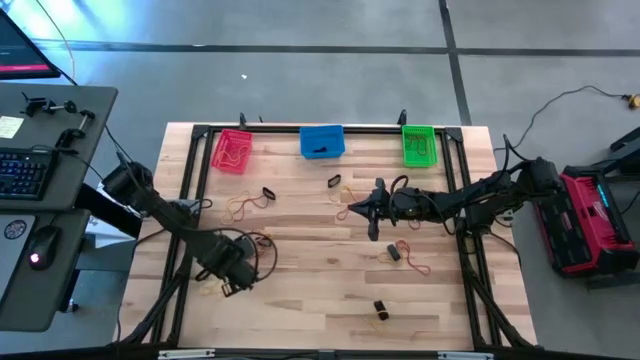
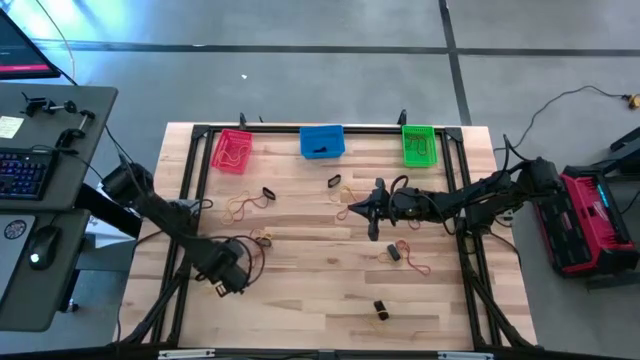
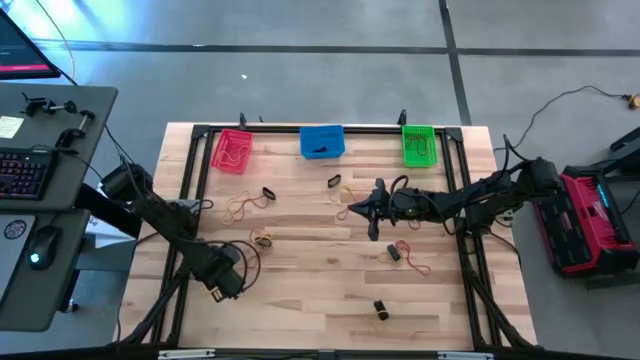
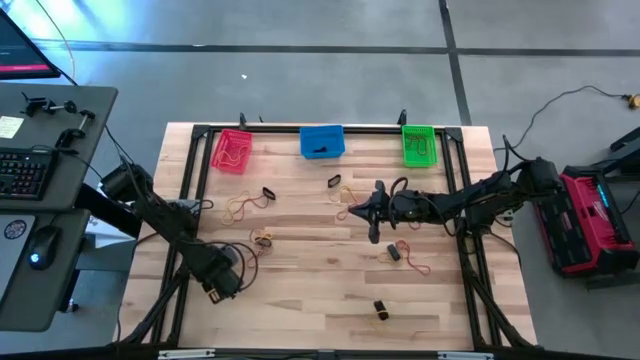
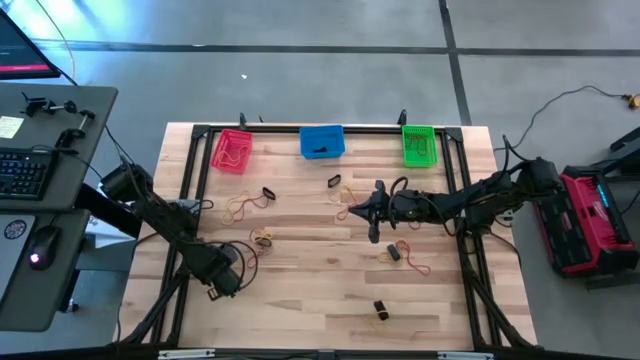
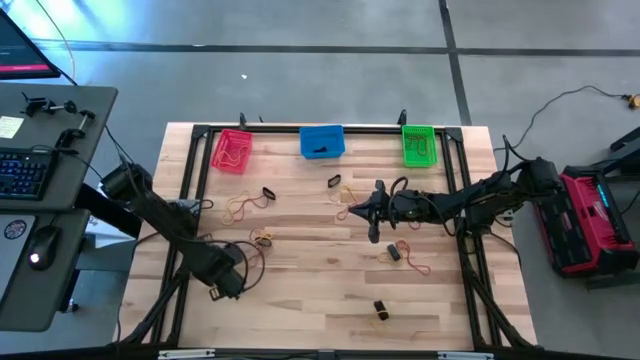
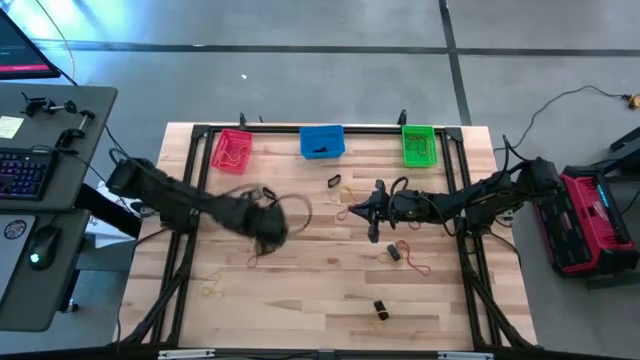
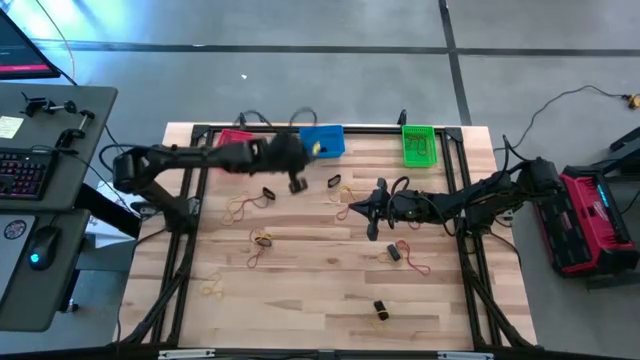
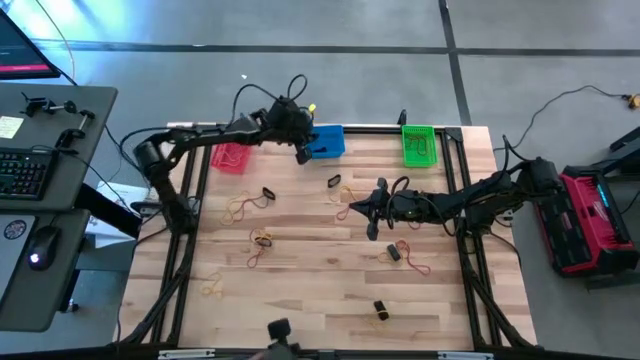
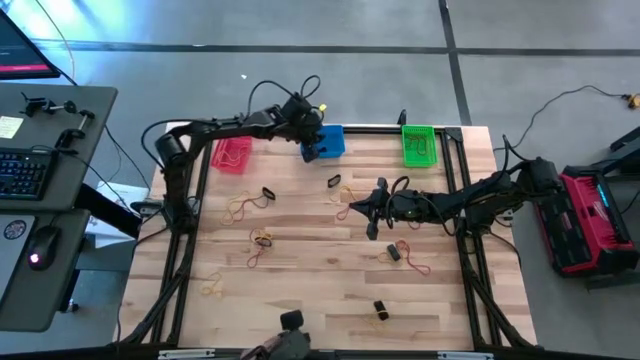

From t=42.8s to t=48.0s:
Task: Sort rubber bands into baskets
Put the black rubber band into the blue bin

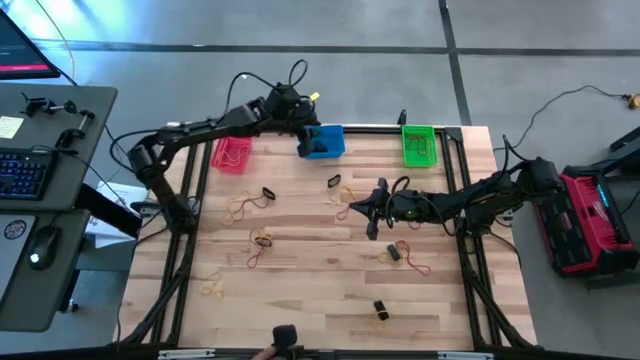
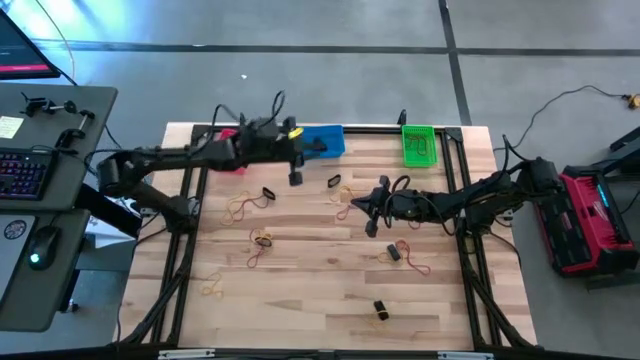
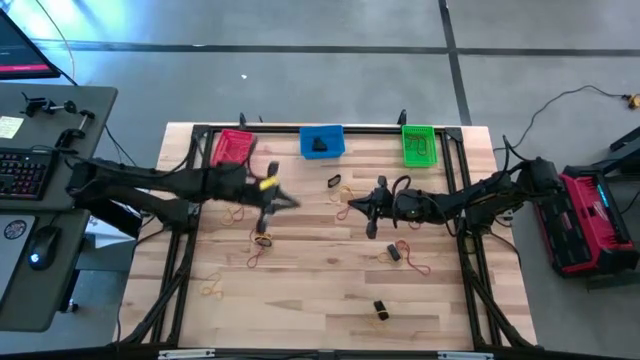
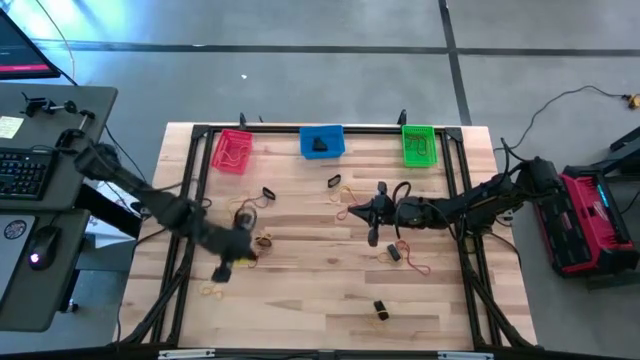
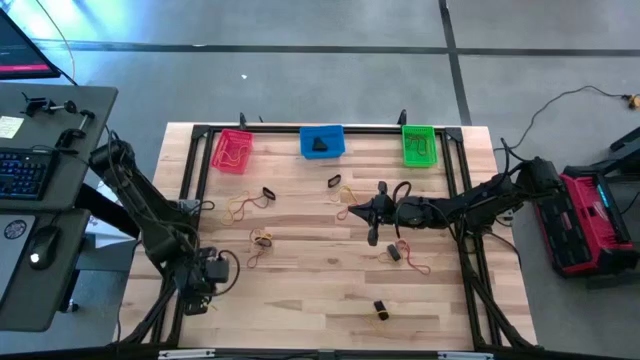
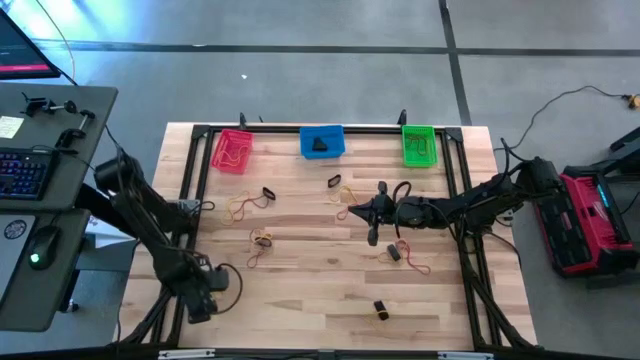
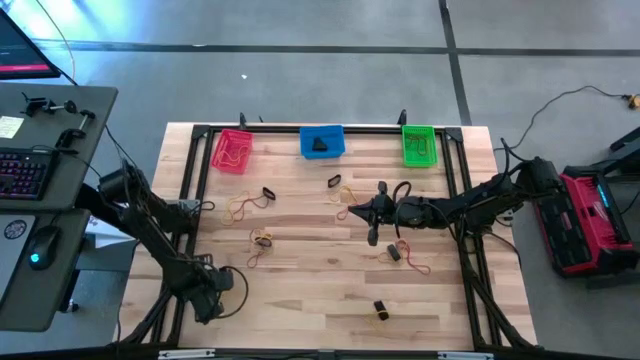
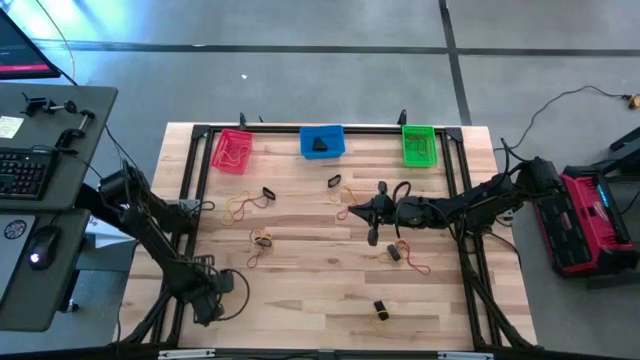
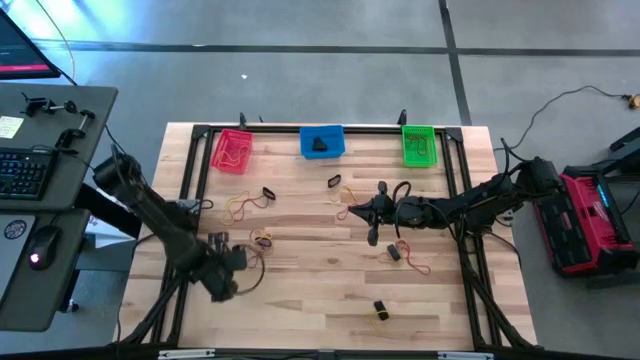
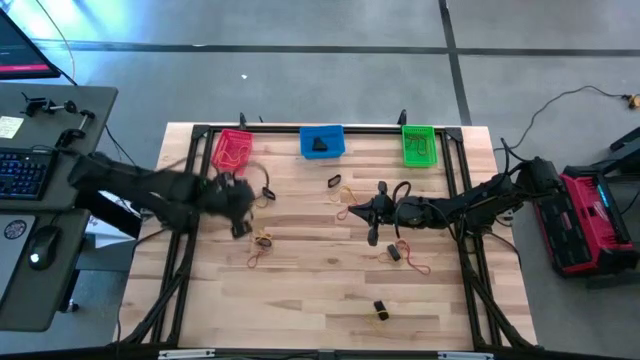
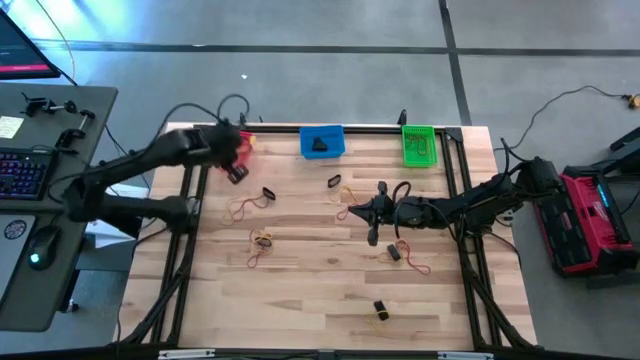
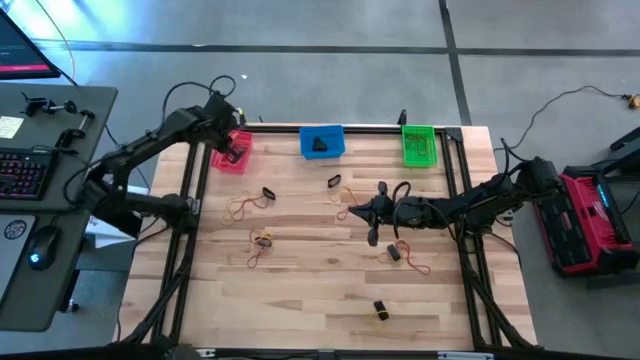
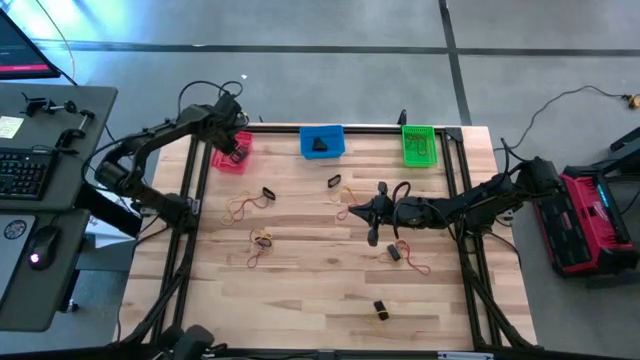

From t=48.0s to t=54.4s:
Put the yellow rubber band into the red bin

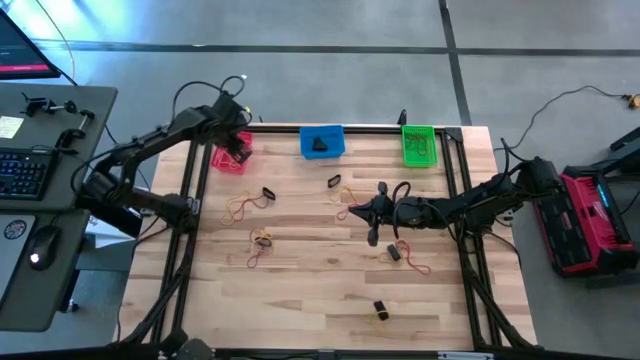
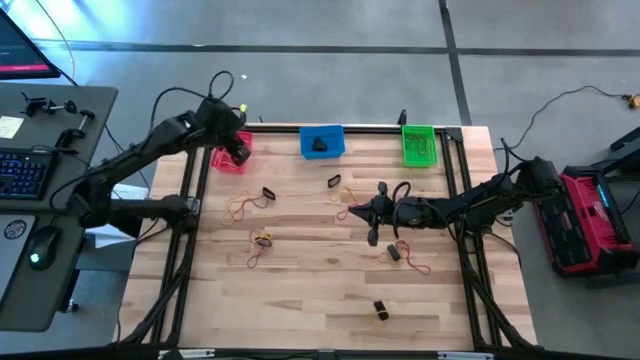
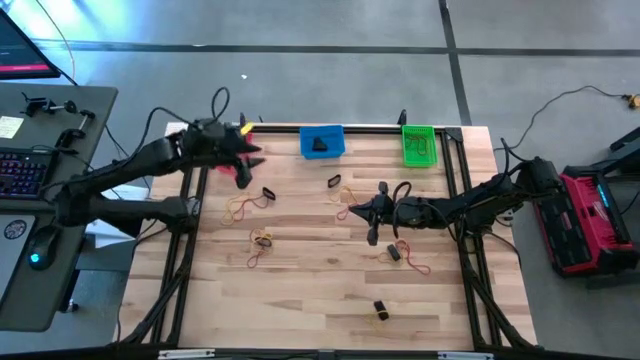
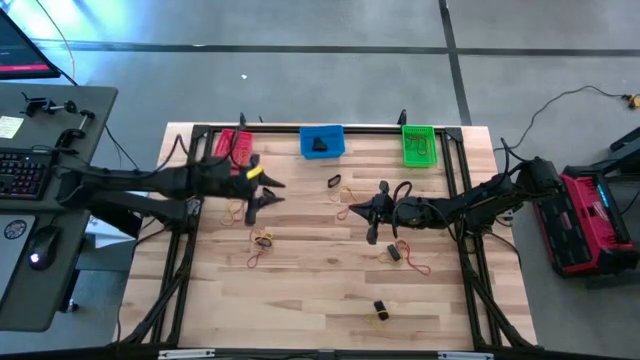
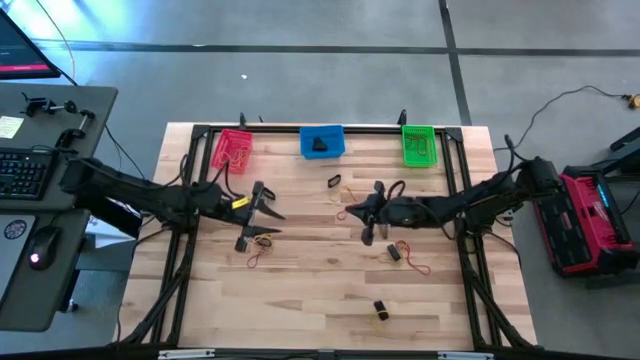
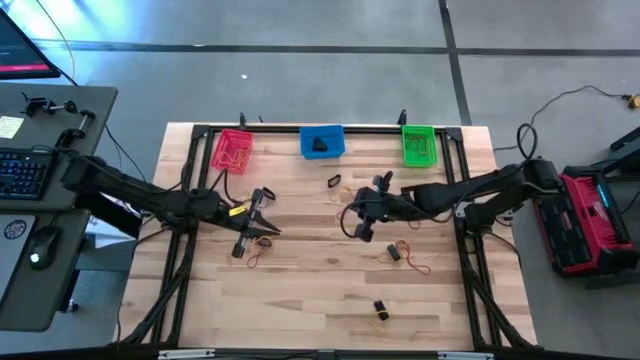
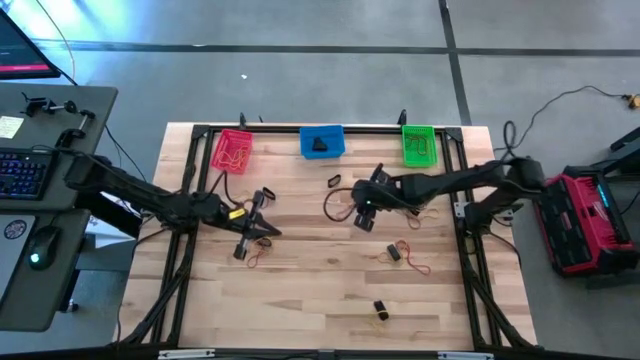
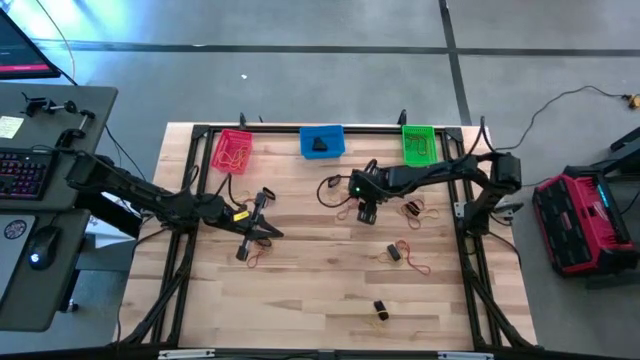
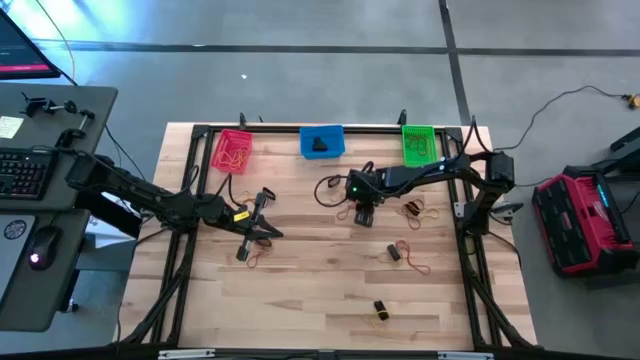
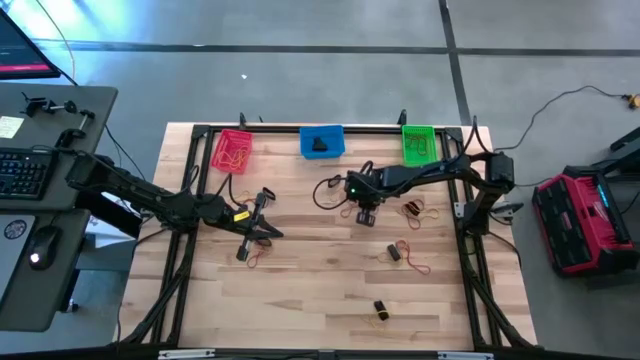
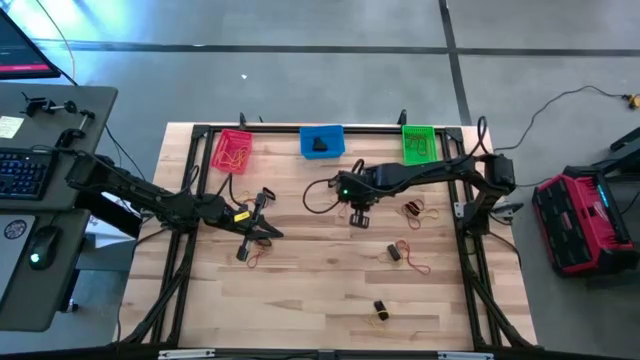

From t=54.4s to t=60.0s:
Put the red rubber band into the green bin

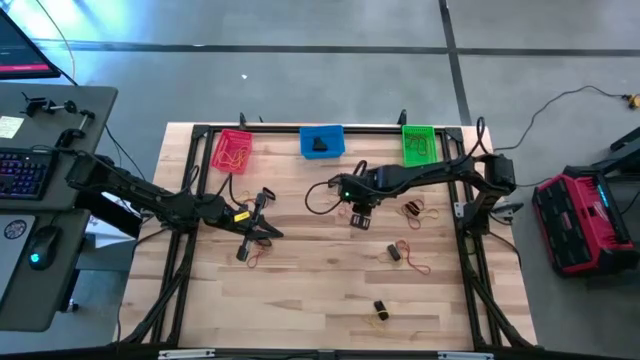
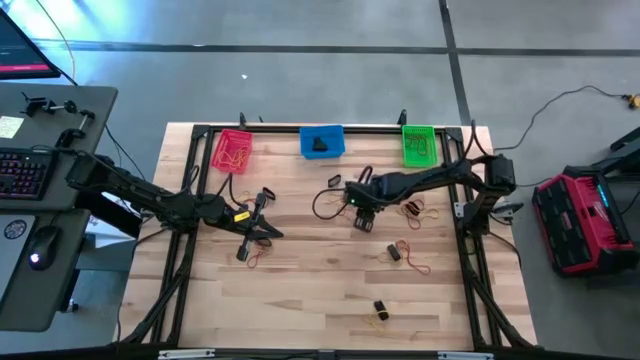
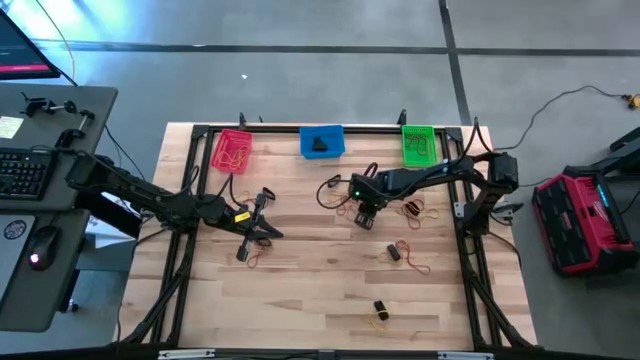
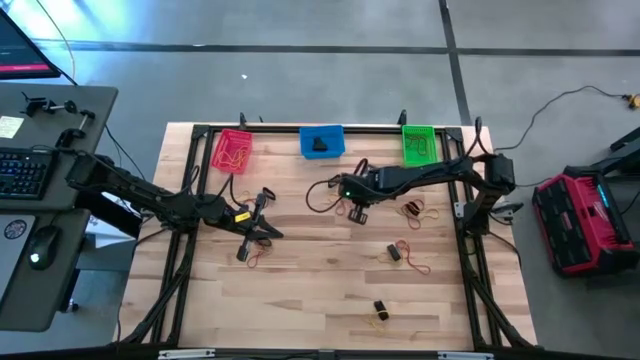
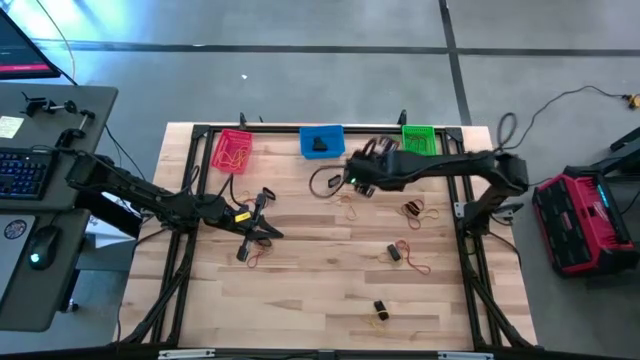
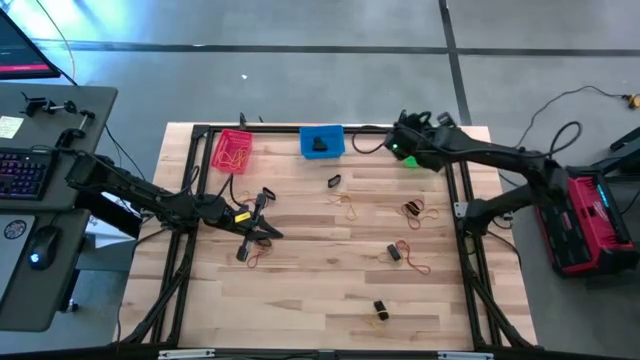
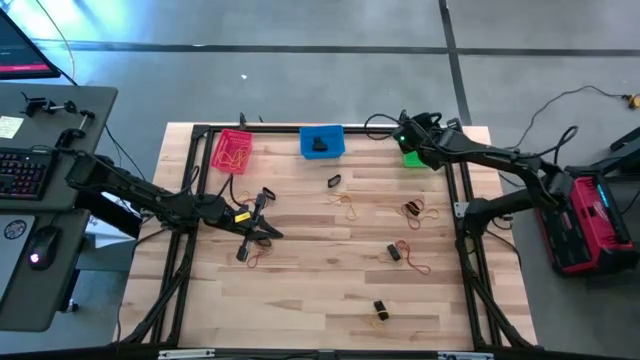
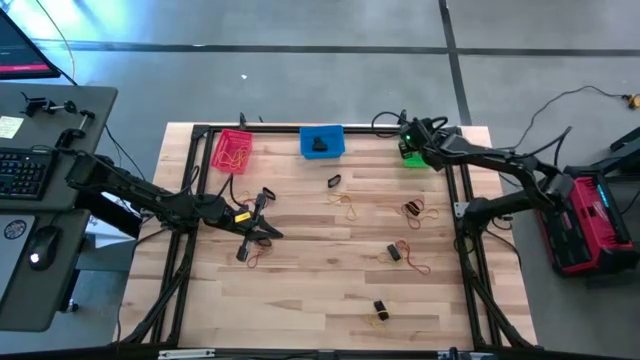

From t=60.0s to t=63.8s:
Put the red rubber band into the right green bin
